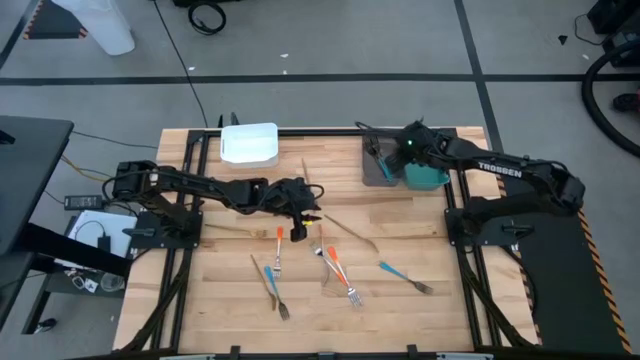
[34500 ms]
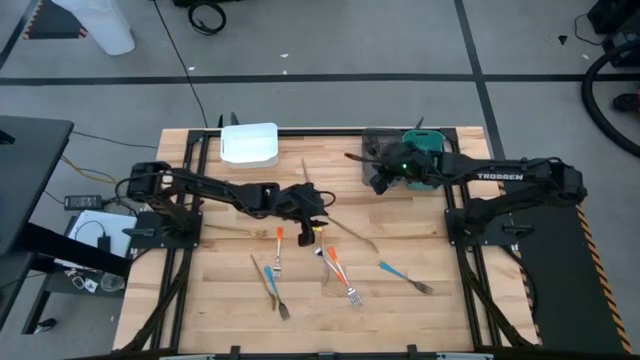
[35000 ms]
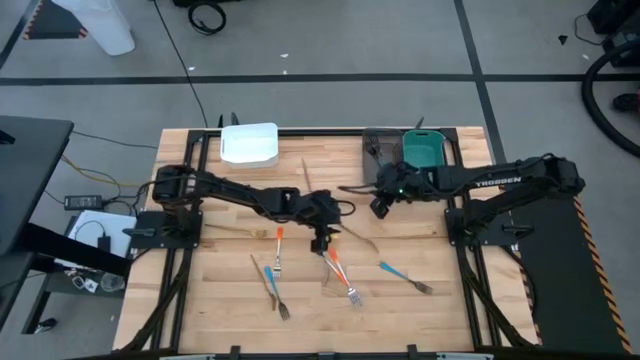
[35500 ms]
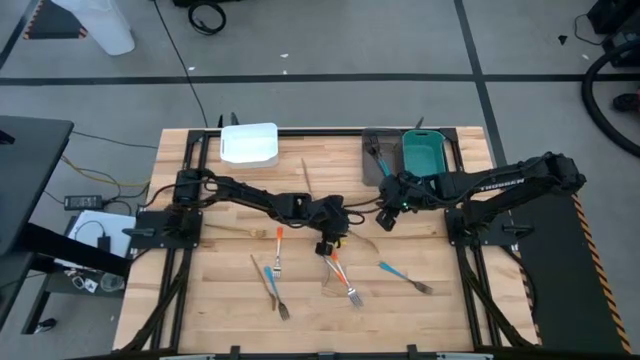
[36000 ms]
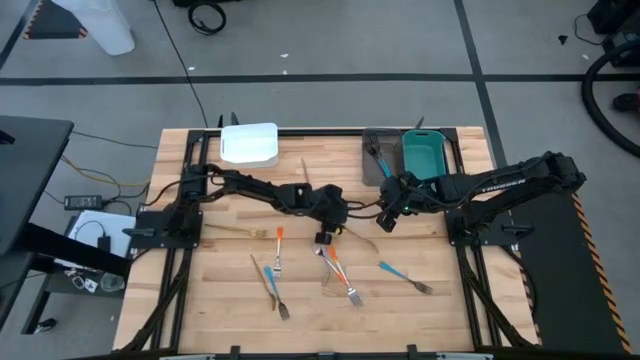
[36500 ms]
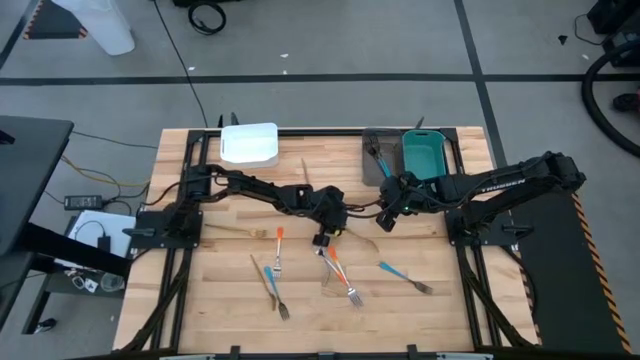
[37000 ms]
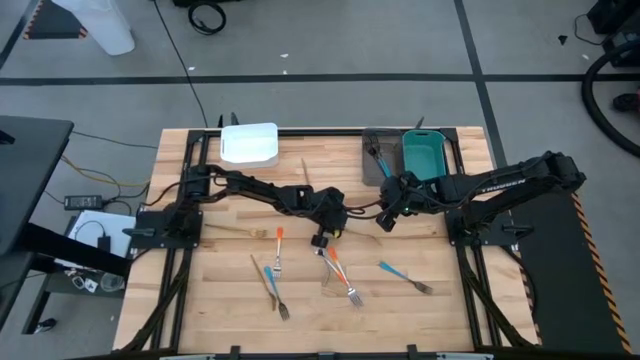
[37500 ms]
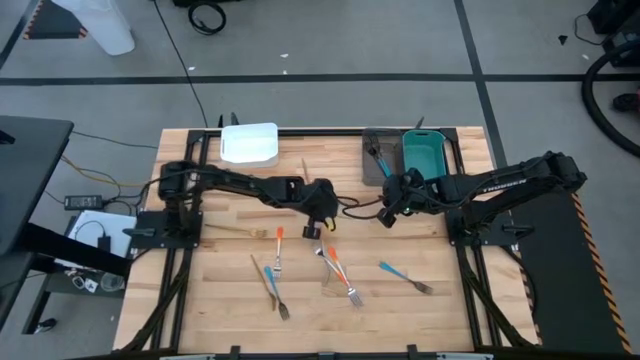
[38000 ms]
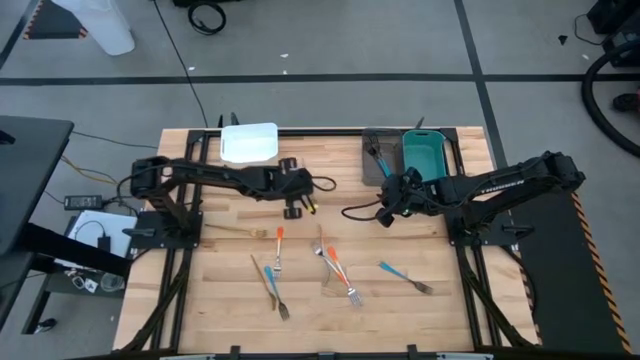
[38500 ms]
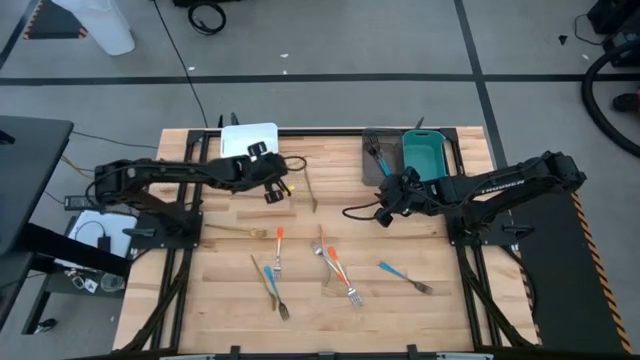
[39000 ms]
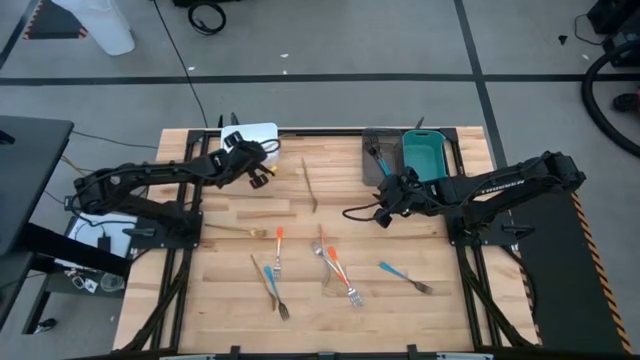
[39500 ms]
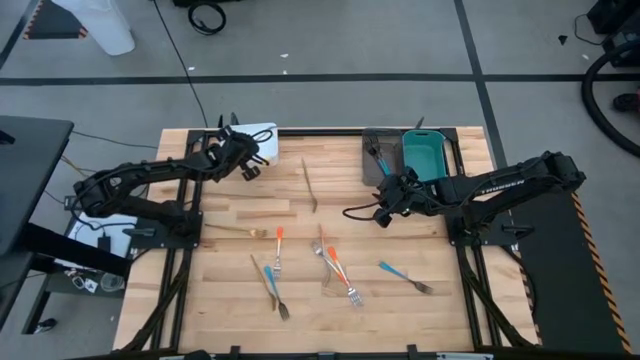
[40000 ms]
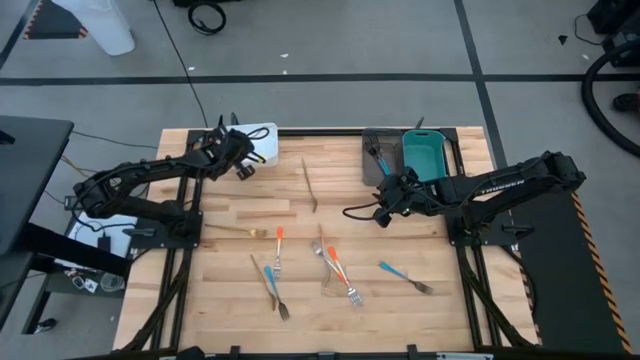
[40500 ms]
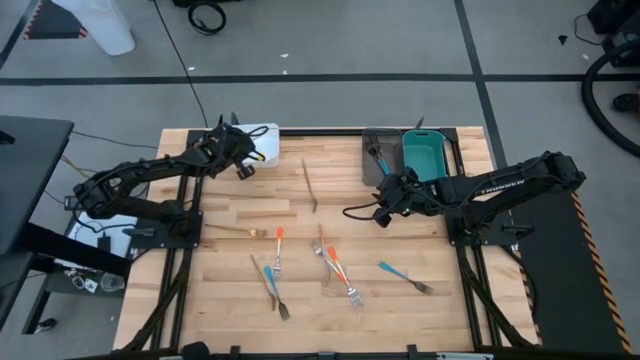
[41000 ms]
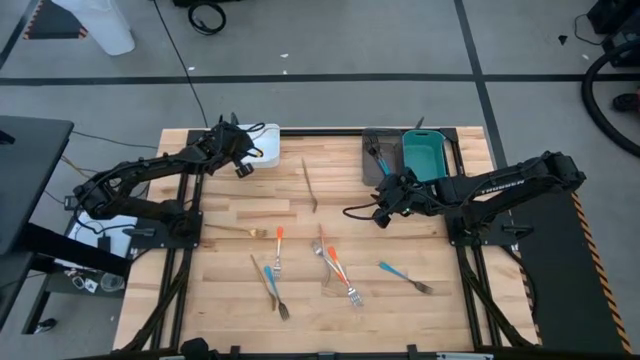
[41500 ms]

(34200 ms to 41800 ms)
Task: Sort silverware by color (type)
Put the middle right gold fork into the white bin

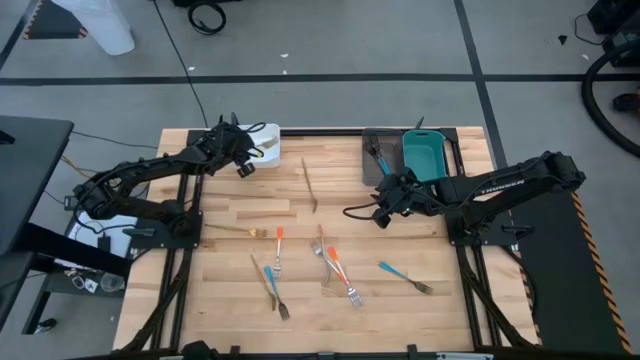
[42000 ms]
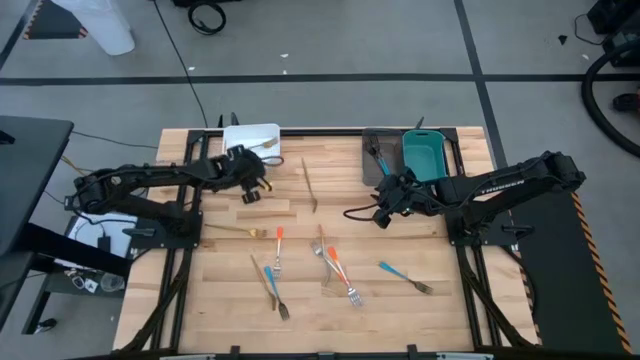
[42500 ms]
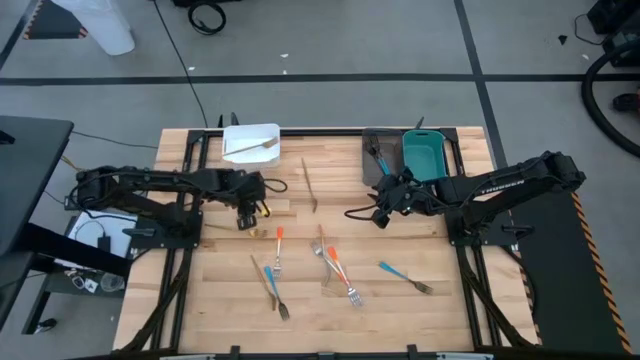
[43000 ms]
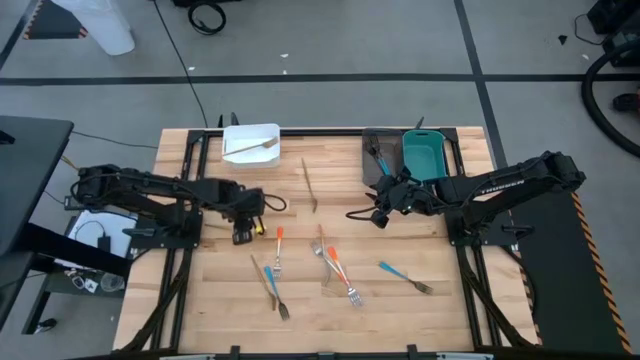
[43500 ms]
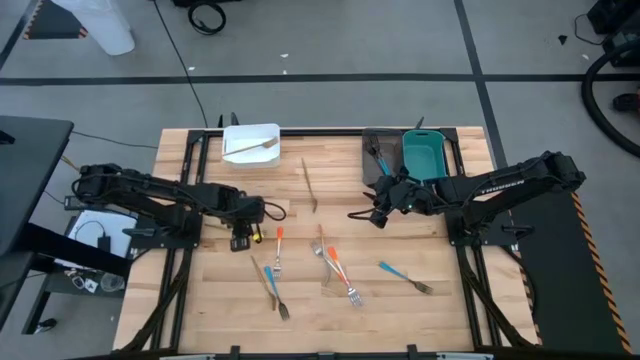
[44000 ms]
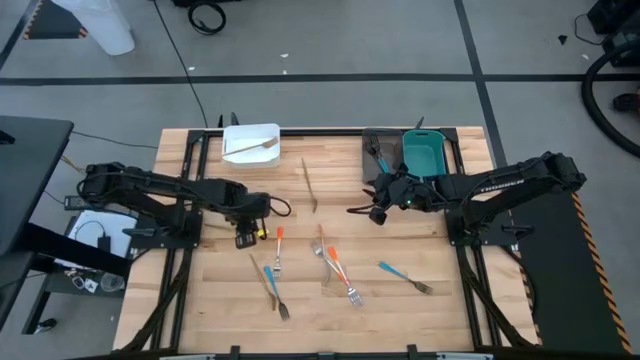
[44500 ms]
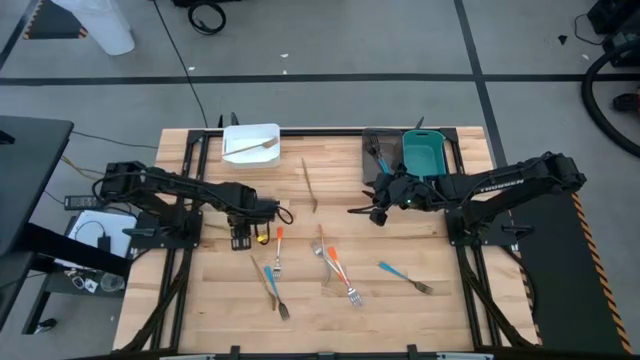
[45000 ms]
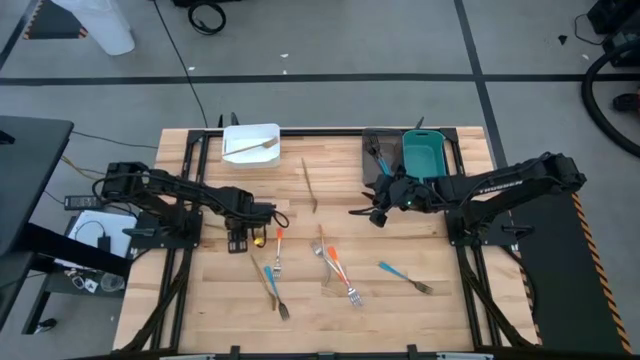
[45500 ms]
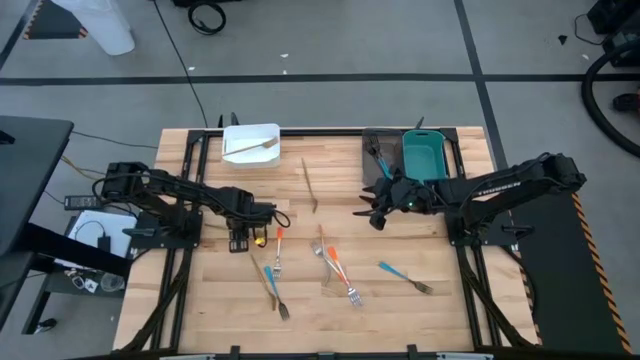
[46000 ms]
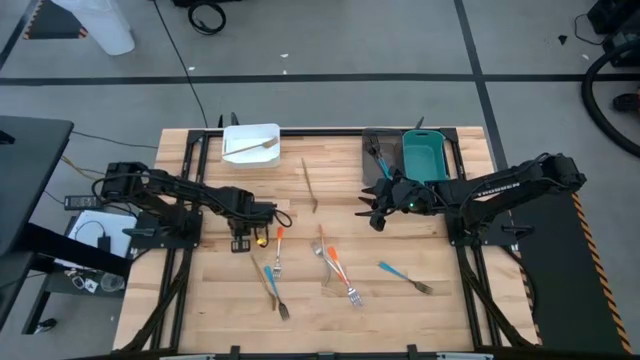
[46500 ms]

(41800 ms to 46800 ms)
Put the middle left gold fork into the white bin

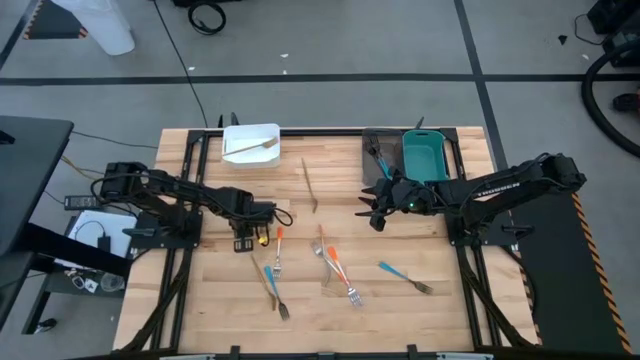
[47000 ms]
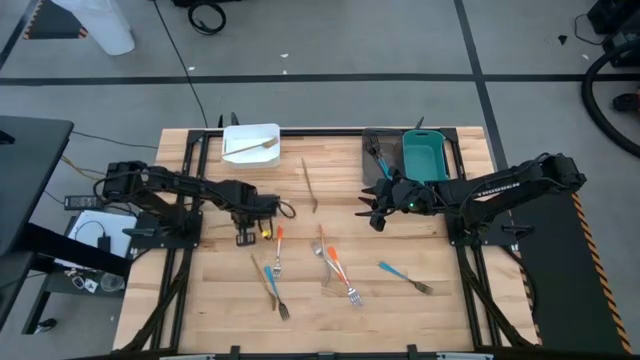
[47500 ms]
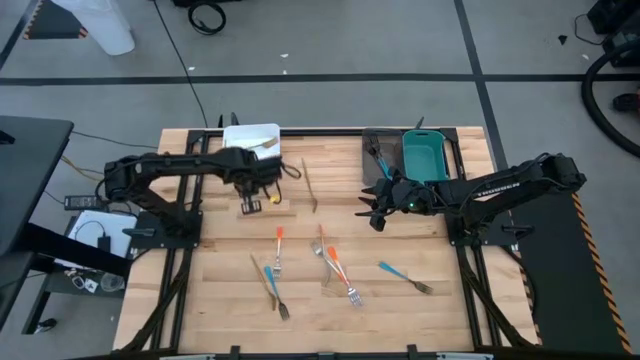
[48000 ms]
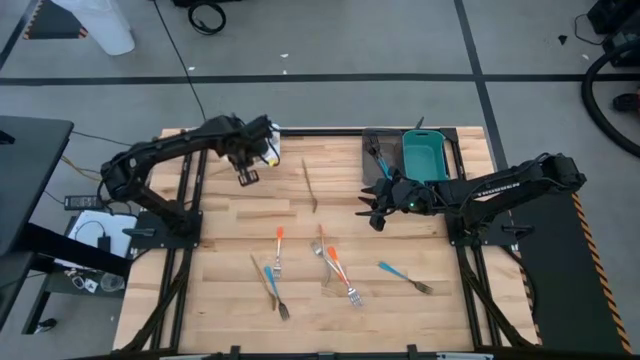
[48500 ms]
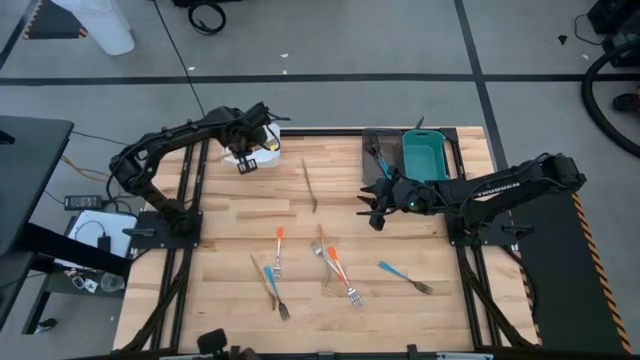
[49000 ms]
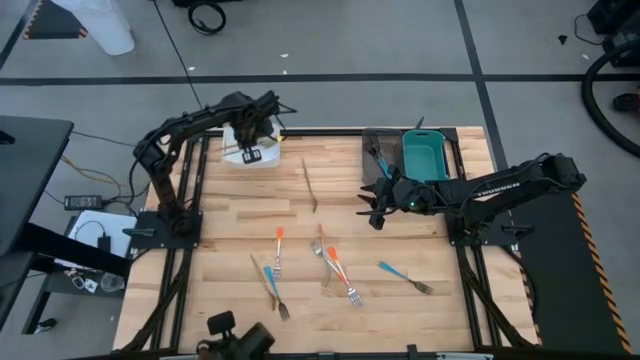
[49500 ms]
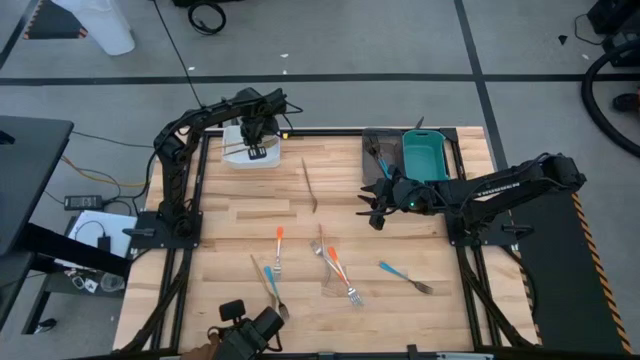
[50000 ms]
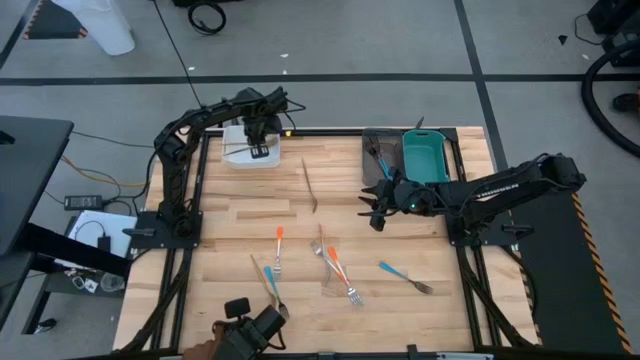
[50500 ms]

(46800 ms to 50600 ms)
Put the middle left gold fork into the white bin

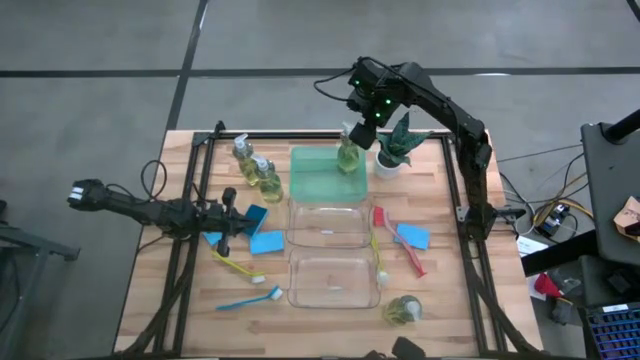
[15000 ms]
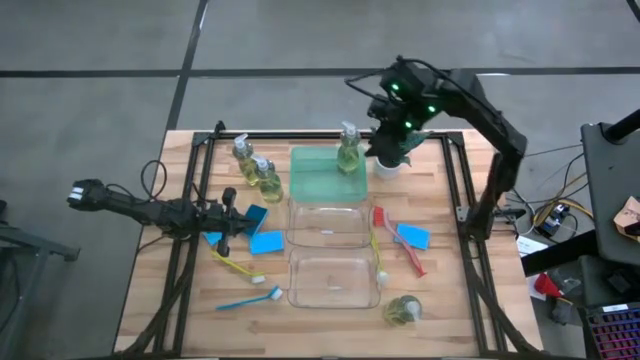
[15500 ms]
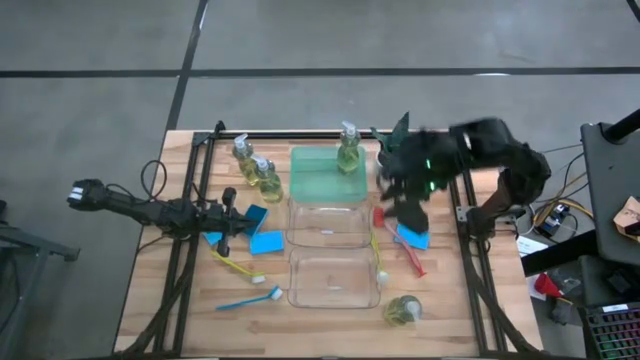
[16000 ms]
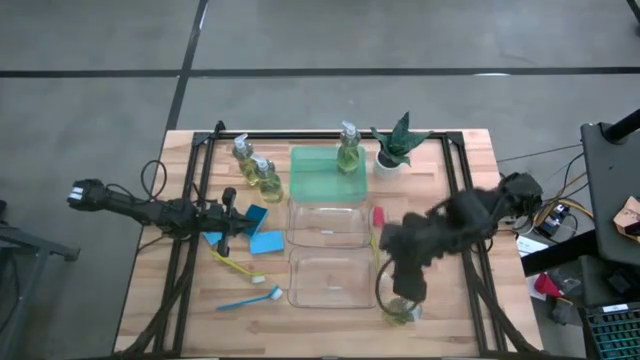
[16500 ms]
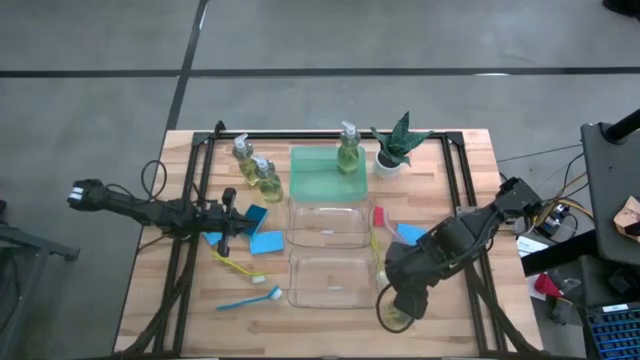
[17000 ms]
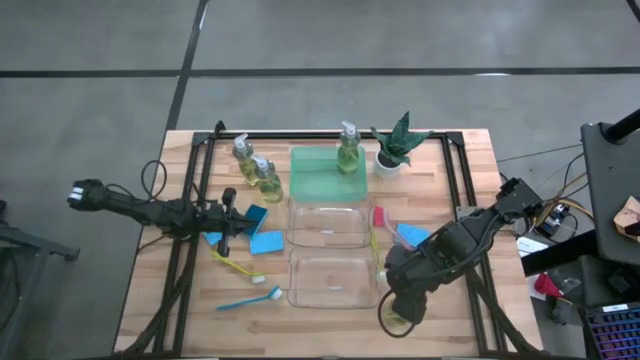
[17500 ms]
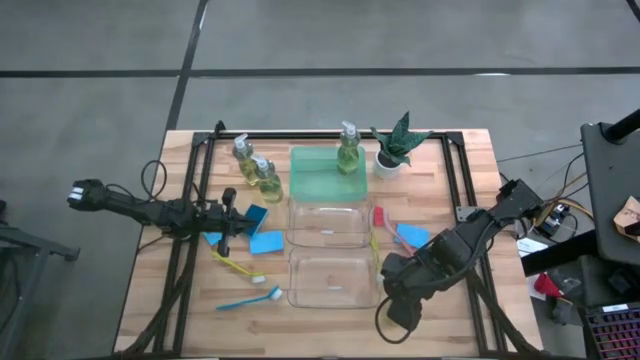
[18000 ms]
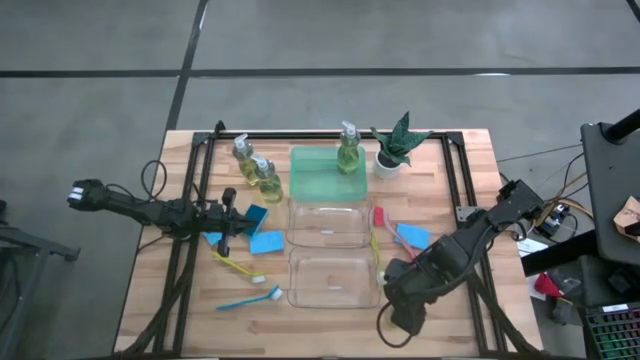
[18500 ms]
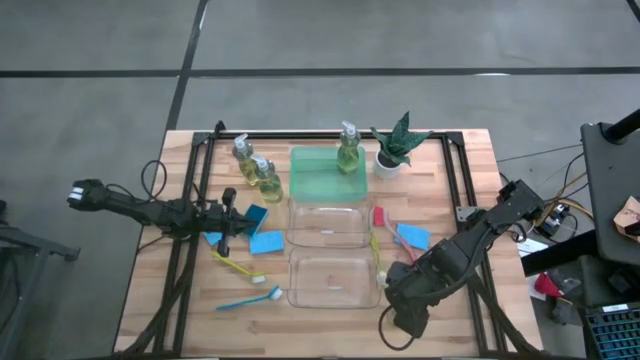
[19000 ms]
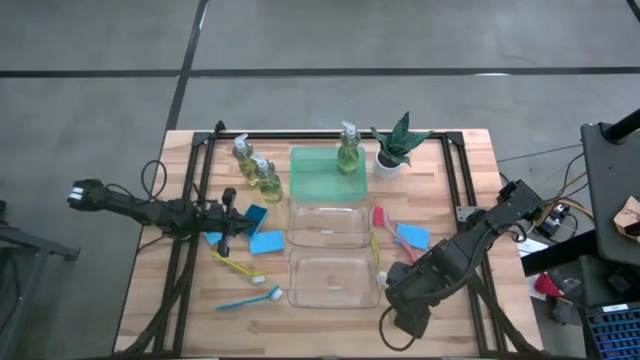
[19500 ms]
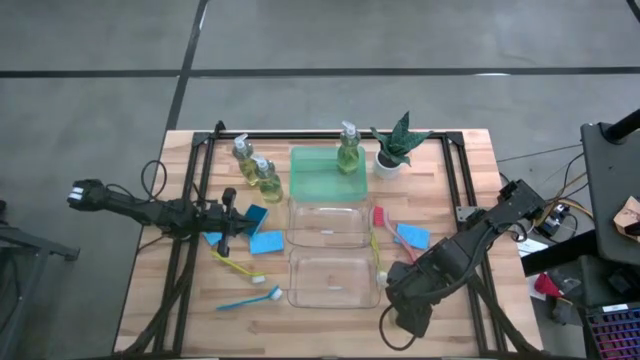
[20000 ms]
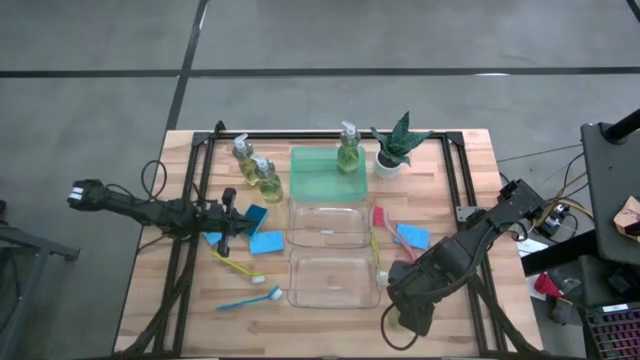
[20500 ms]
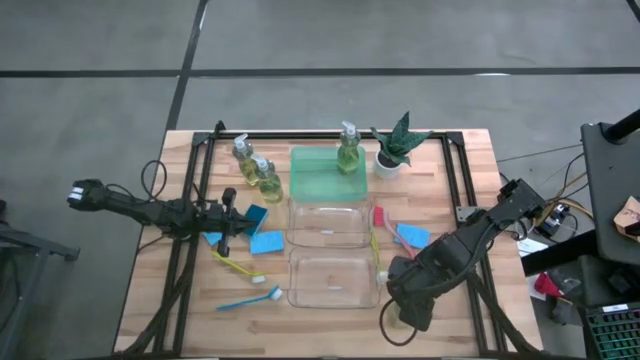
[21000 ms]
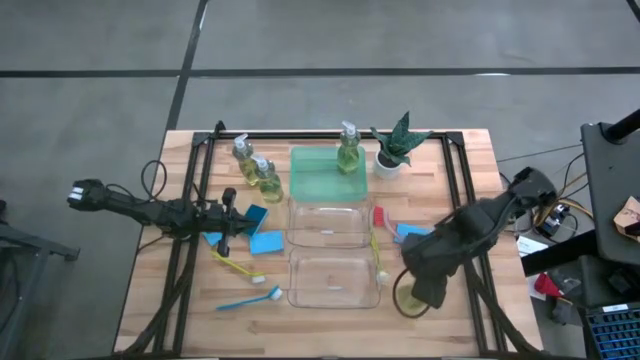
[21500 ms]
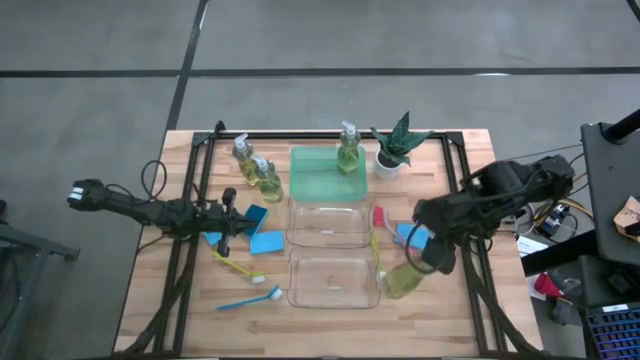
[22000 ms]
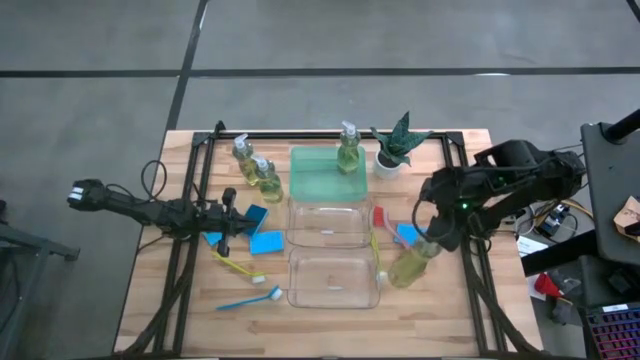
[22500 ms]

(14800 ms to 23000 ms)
Task: Pick & Place Kitchen Sink Supplies
Put the transparent soap dispenser into the blue bin
